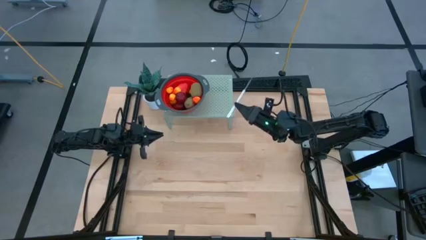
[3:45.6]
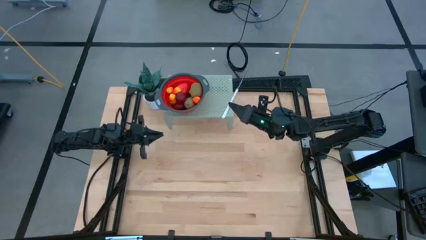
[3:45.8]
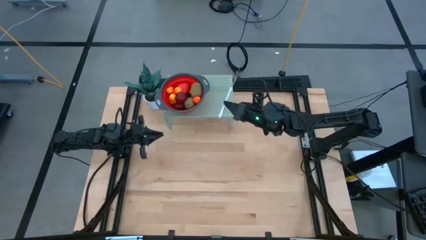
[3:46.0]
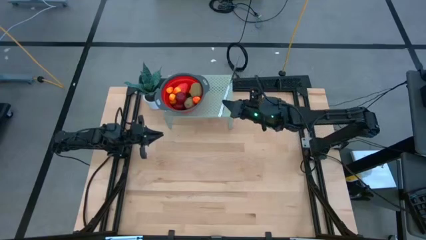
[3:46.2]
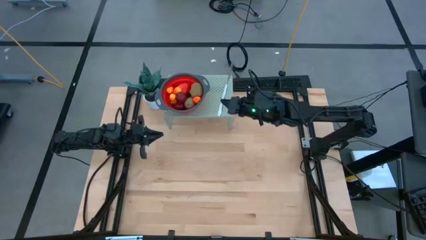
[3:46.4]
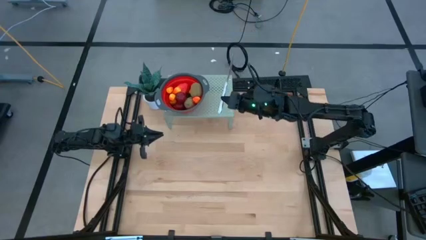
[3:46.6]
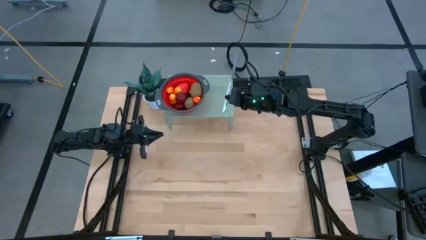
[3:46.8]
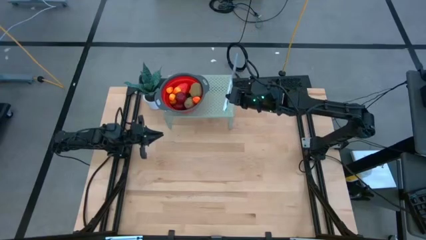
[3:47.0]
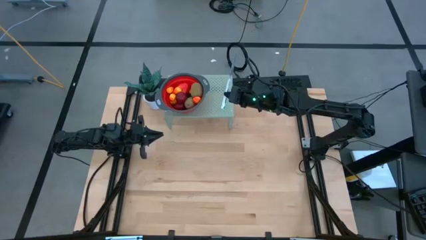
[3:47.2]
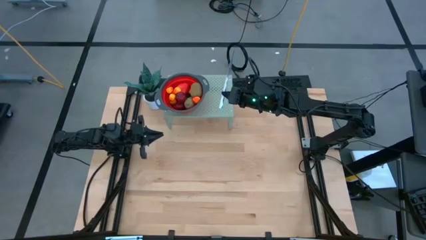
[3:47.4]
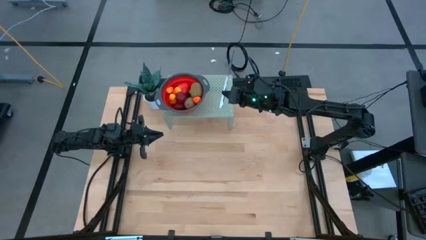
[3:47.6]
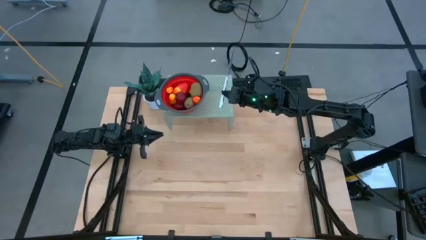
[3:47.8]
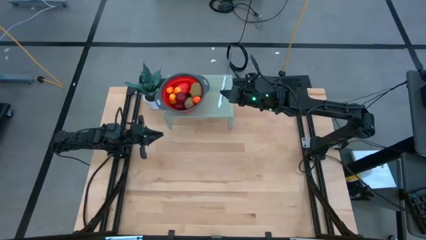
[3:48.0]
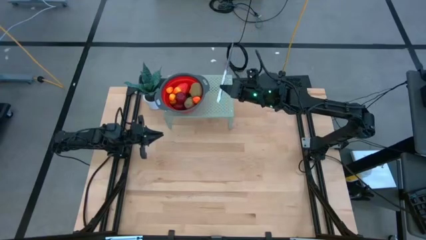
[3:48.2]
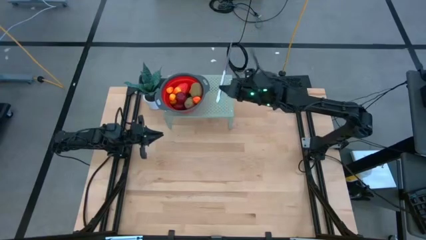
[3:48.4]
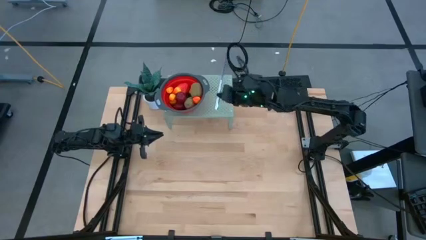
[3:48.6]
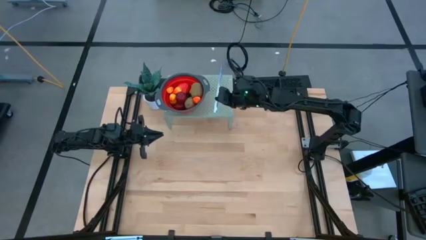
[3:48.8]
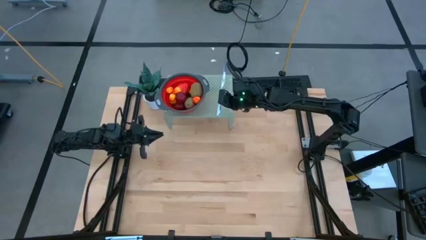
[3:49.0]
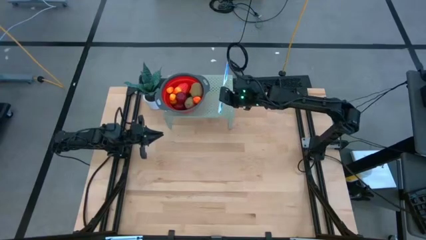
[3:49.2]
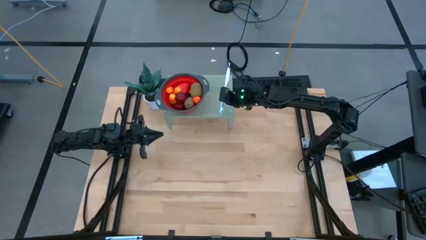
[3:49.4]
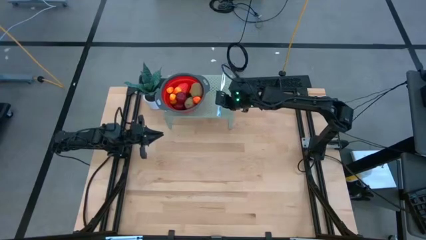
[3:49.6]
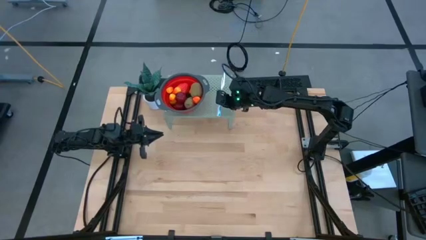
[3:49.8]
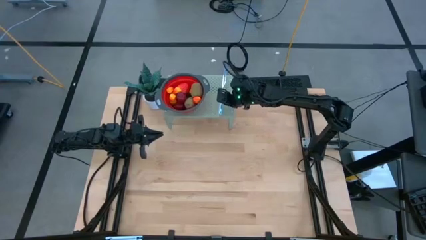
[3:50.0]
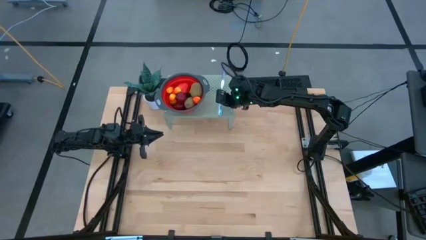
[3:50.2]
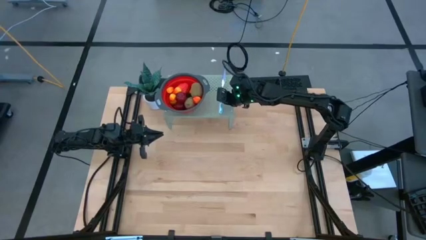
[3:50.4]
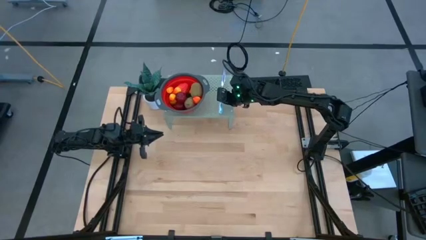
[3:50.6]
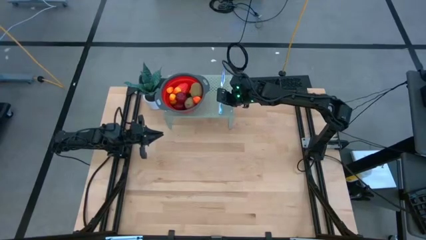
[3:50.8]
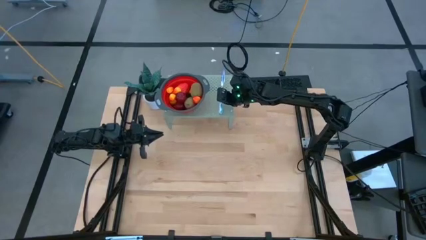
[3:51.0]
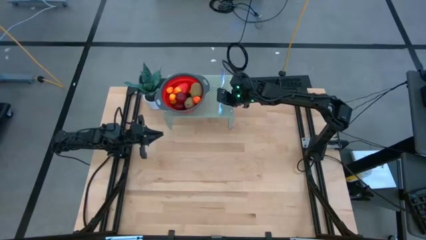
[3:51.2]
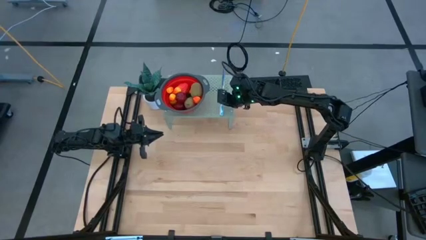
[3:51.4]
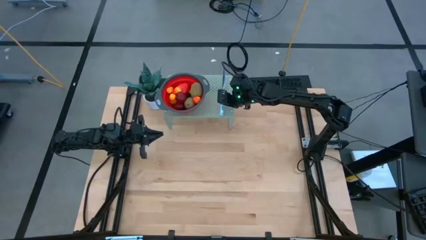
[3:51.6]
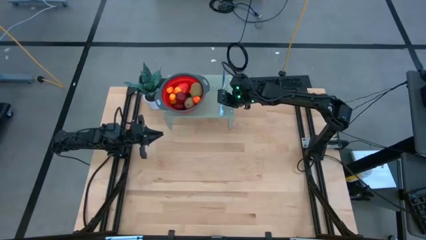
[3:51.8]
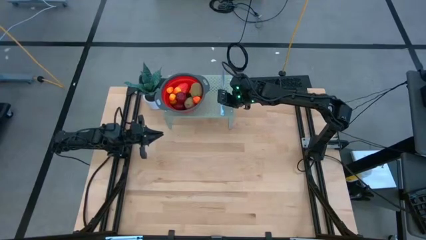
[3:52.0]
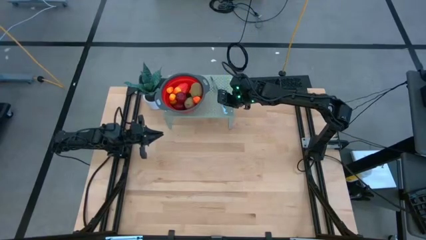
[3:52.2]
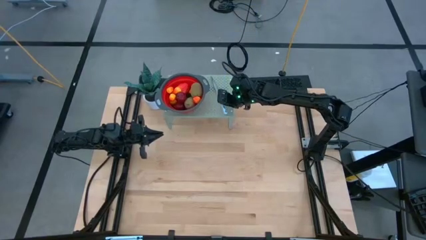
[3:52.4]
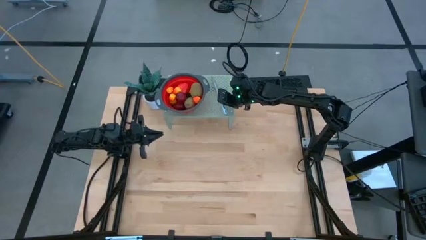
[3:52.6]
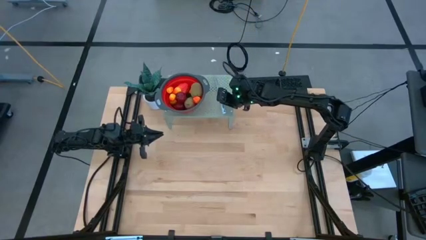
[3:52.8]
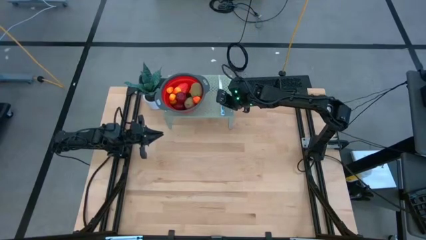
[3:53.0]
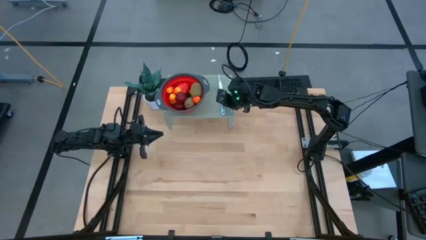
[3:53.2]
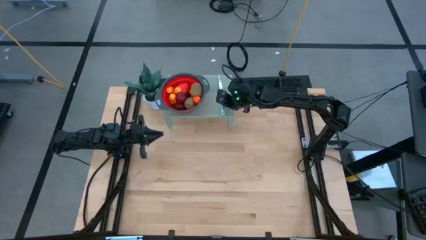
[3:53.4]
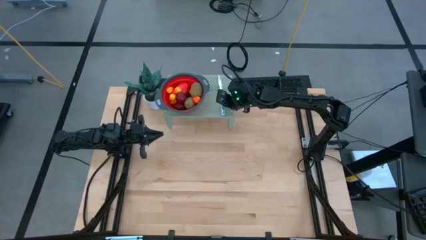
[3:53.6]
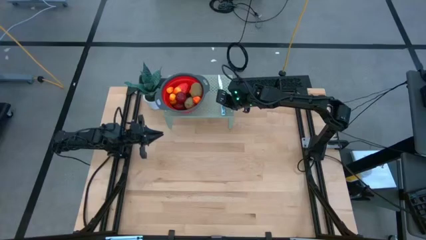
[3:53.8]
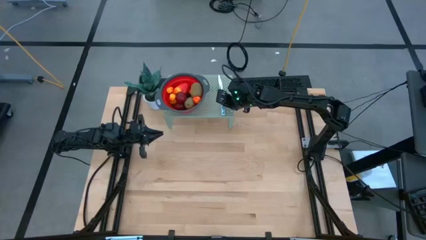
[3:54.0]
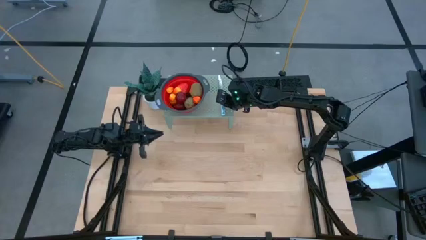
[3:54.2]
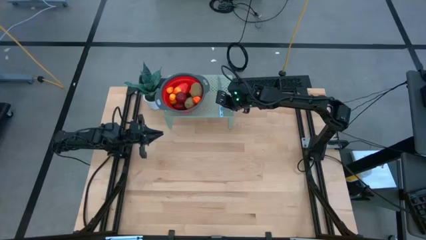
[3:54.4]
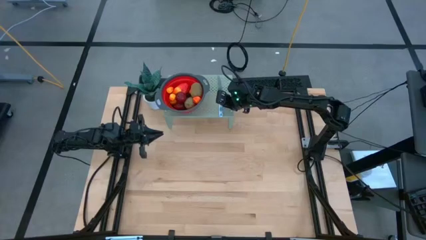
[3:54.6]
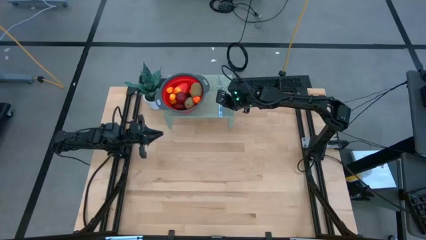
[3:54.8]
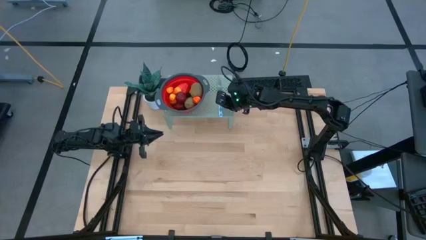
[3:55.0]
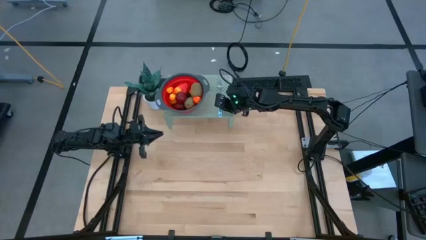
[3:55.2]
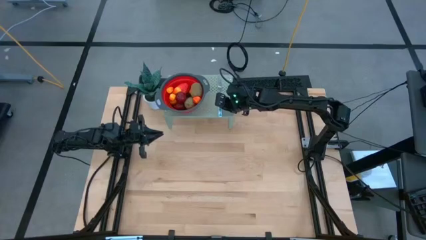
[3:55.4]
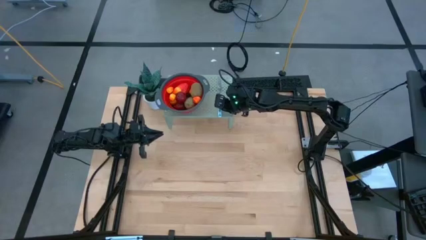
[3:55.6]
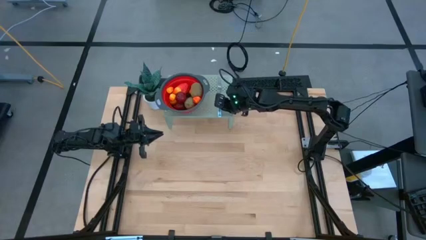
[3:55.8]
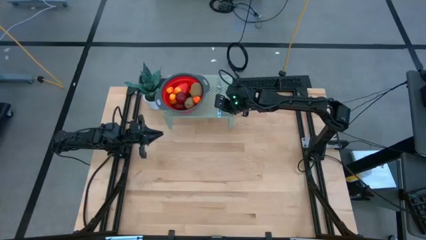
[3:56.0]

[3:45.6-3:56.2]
Task: Pick & Place Fruit
Put the blue knife on the shelf

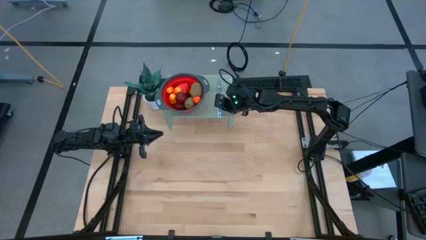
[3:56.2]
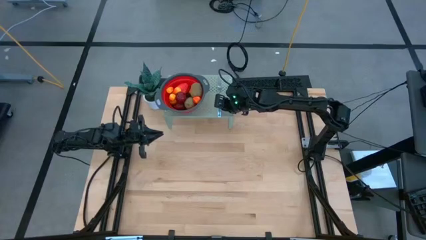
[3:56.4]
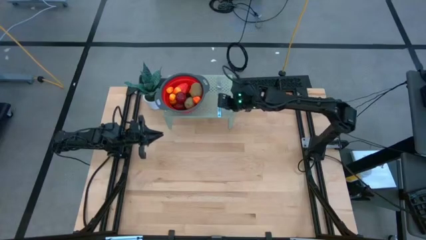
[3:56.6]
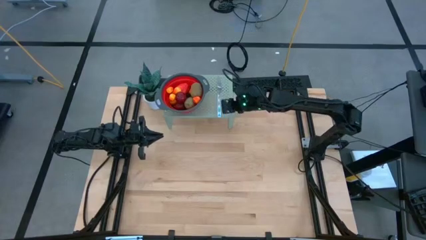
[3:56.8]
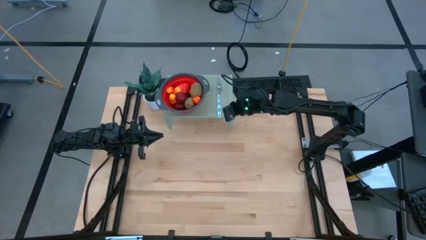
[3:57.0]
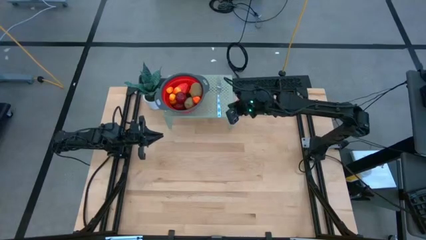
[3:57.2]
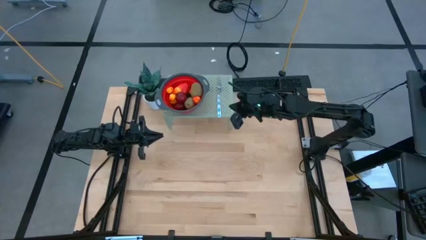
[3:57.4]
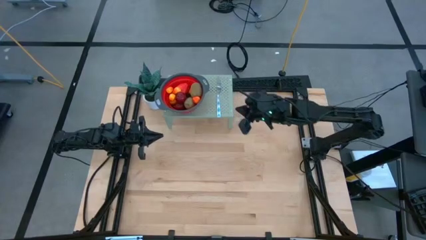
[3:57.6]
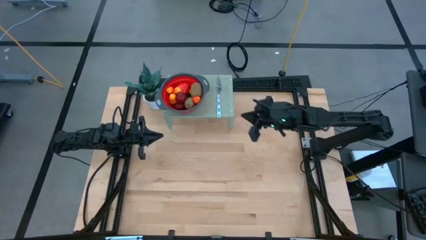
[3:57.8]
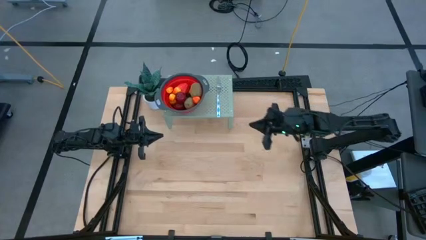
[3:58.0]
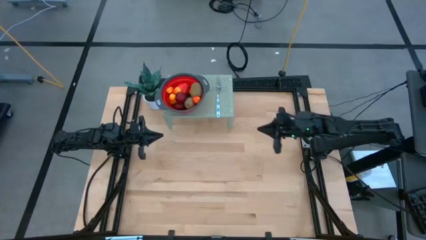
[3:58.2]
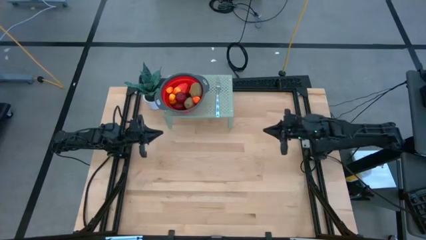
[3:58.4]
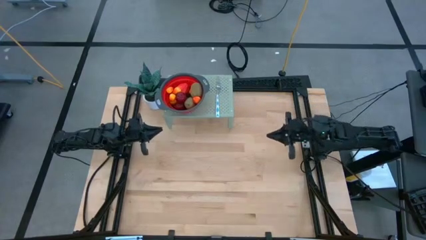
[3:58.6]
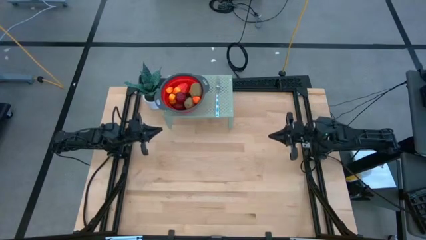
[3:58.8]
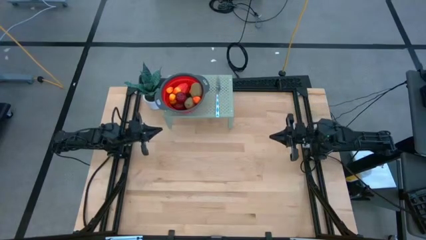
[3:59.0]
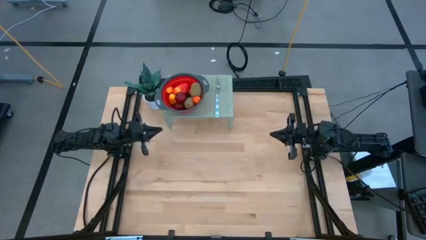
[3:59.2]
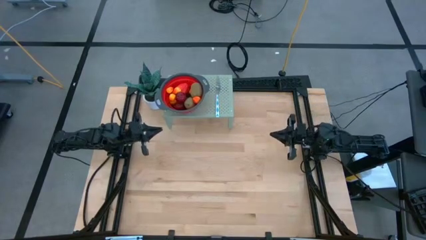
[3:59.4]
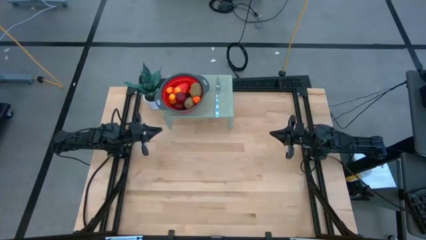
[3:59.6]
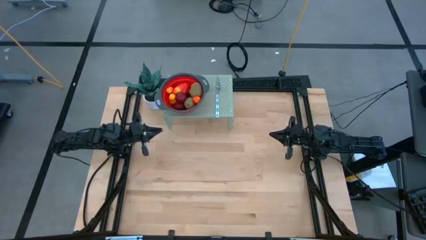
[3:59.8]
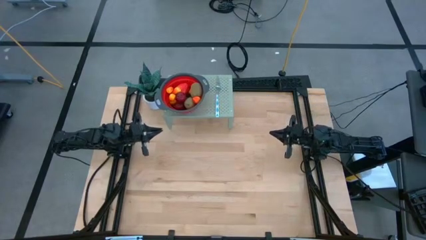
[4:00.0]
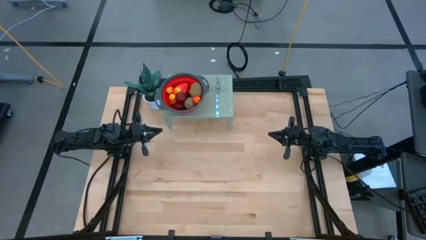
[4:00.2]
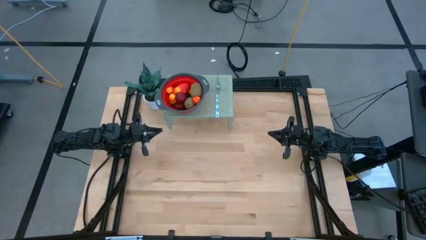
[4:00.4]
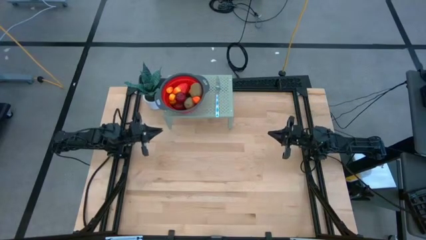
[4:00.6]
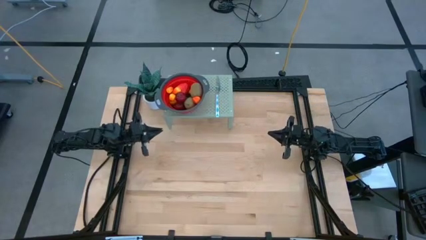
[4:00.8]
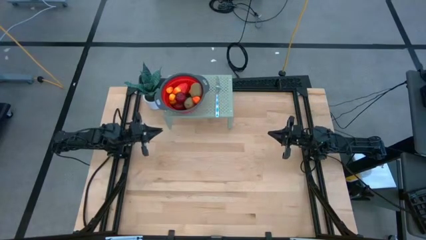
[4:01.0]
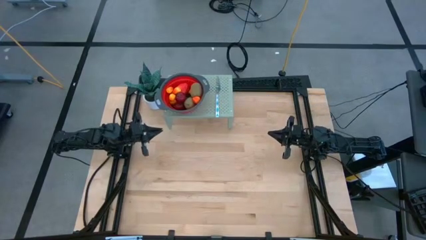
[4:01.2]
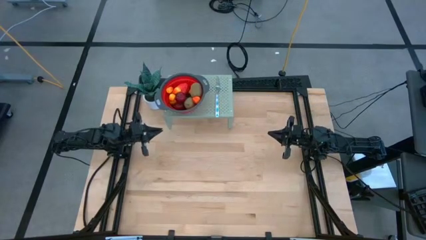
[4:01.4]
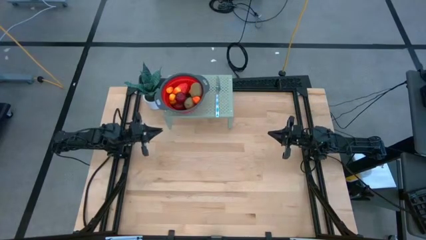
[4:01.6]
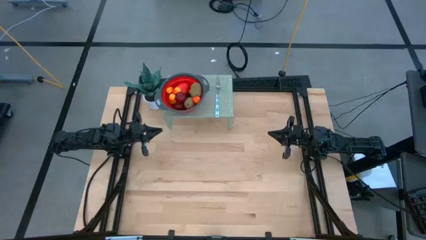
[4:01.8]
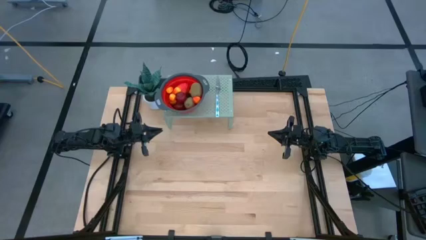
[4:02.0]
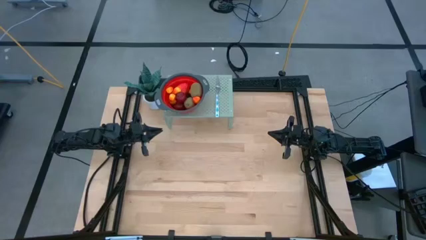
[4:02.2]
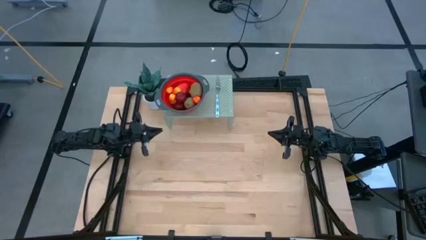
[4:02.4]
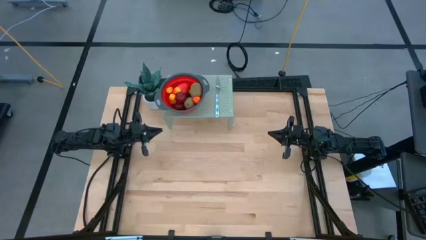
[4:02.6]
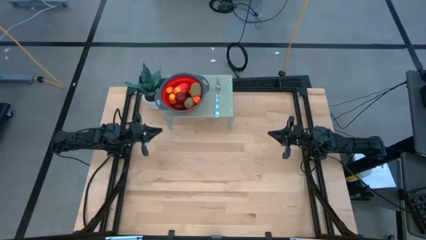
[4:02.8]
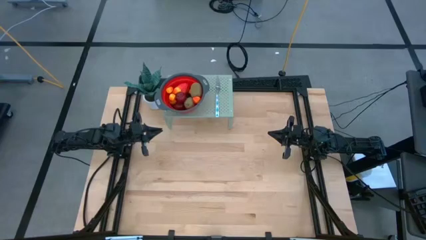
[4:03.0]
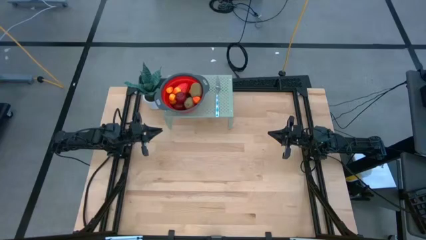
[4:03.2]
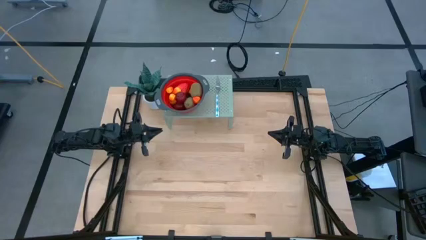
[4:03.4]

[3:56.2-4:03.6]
Return to Home Position
